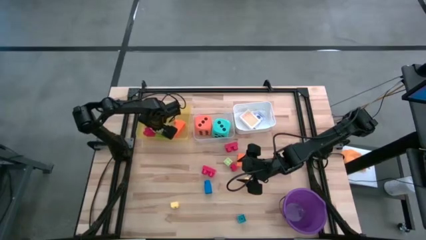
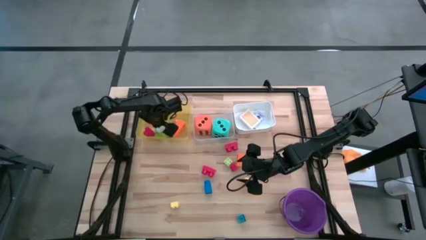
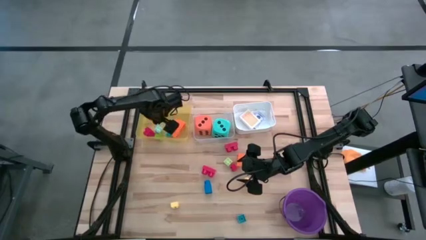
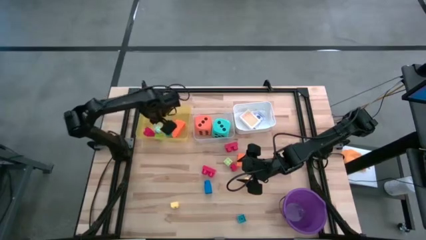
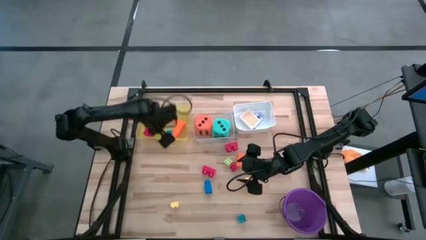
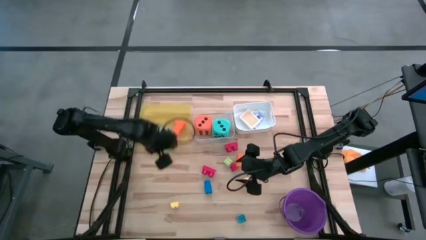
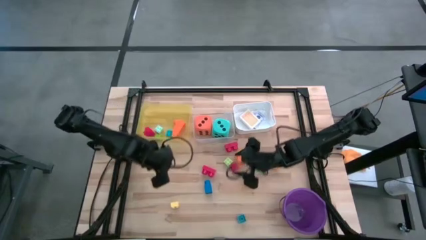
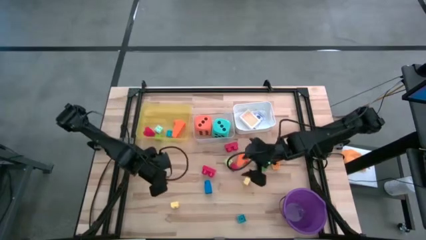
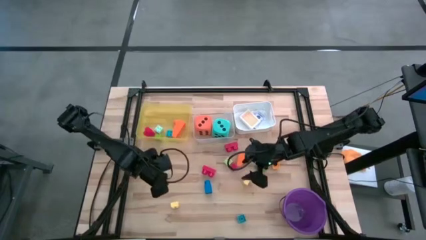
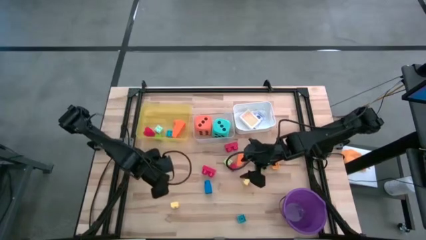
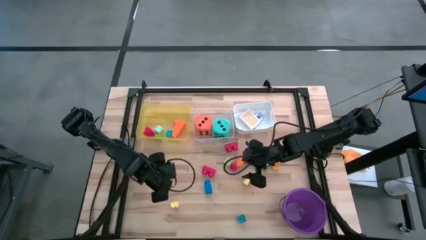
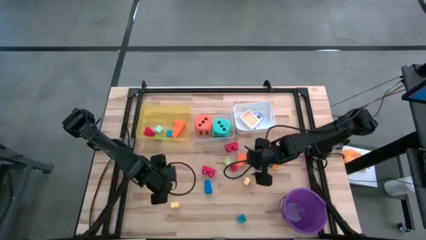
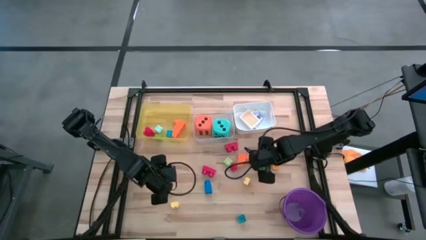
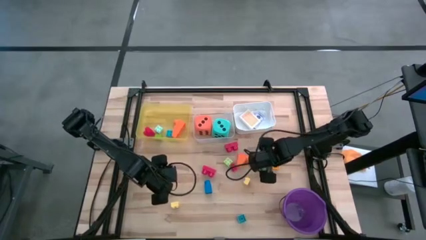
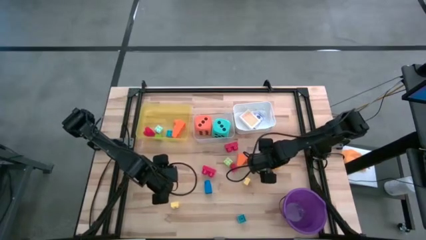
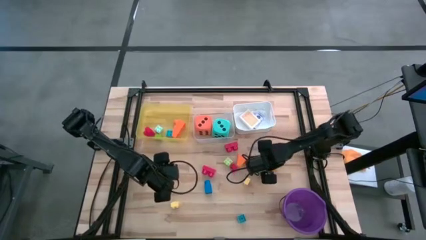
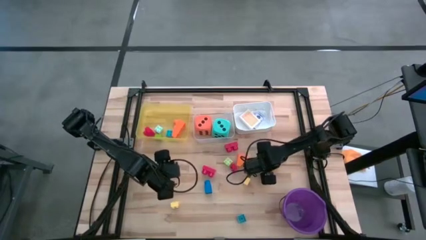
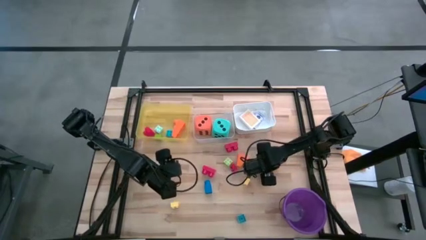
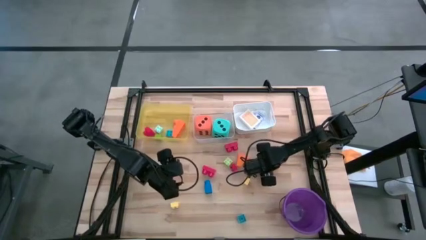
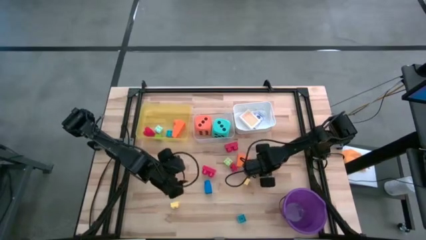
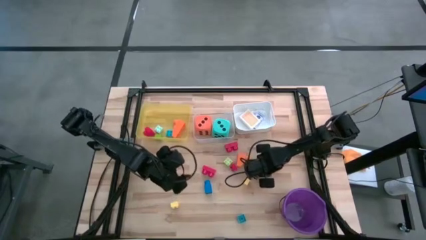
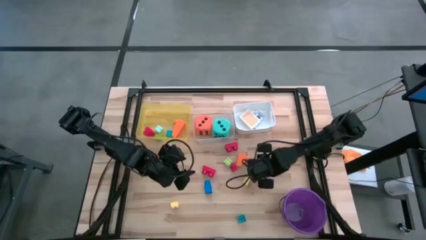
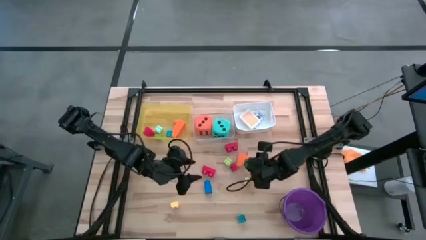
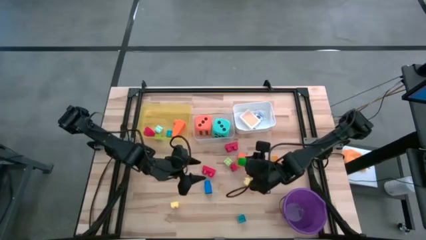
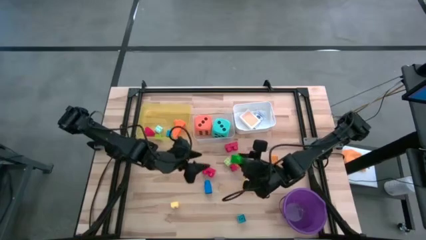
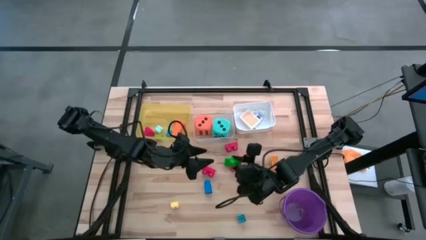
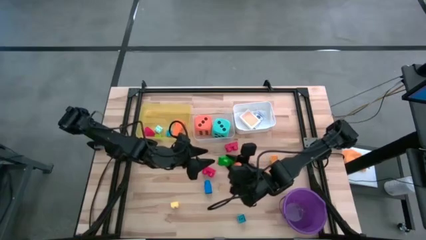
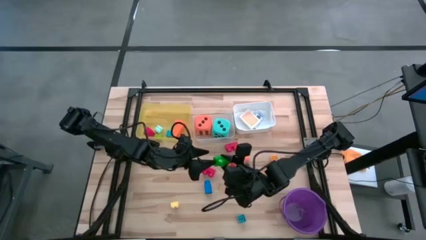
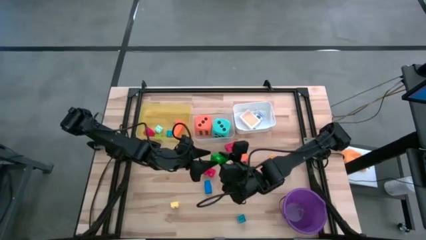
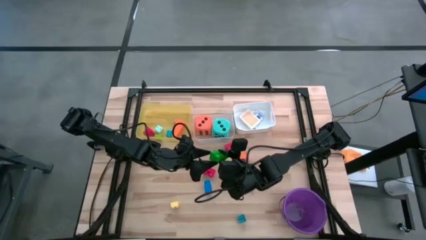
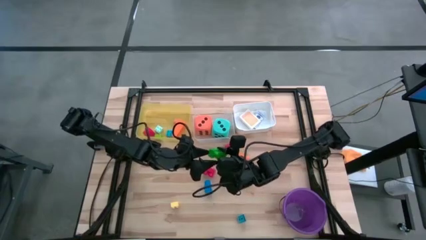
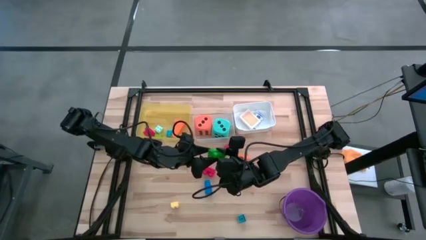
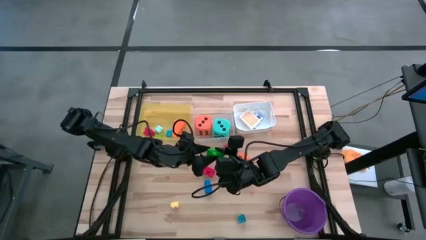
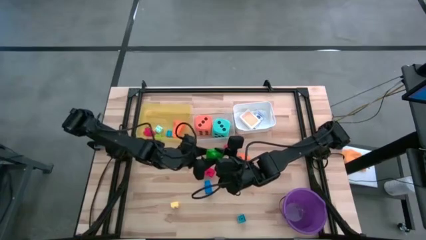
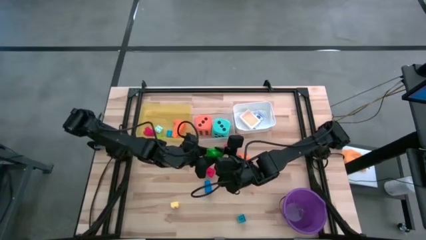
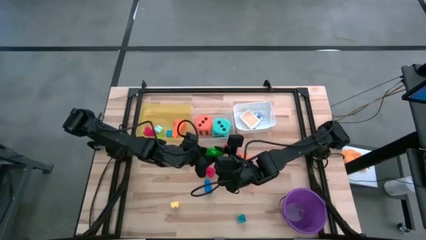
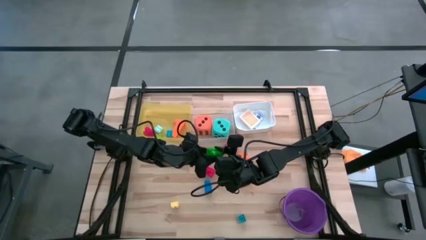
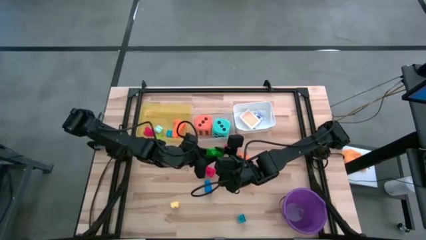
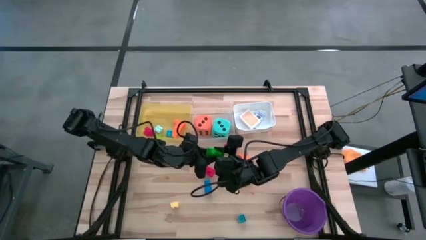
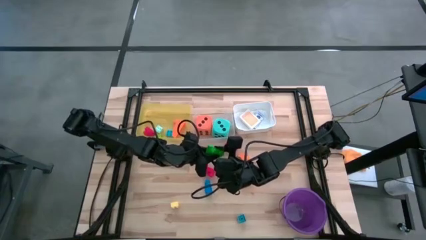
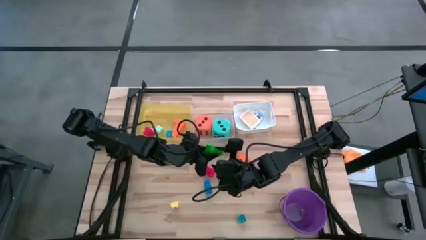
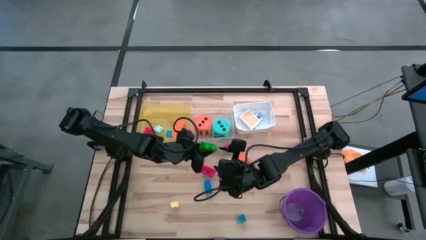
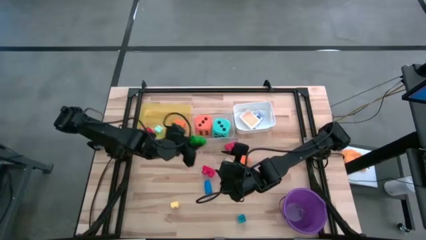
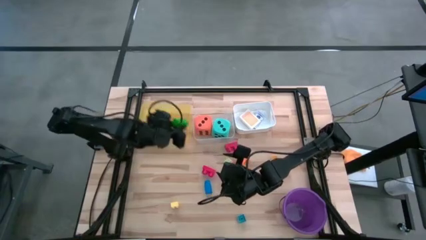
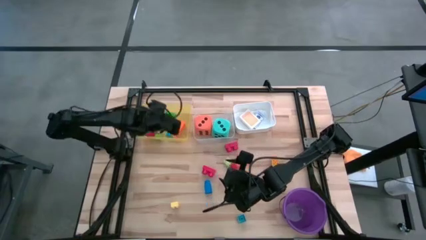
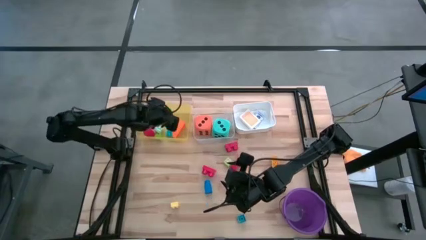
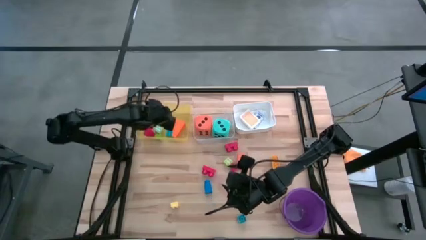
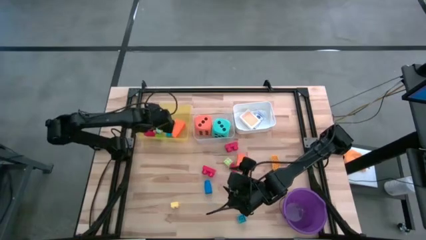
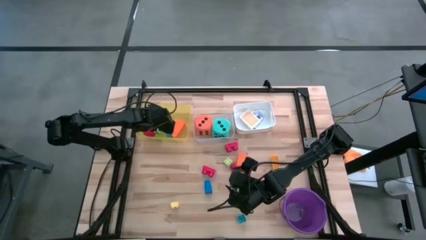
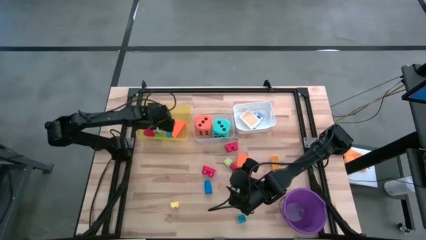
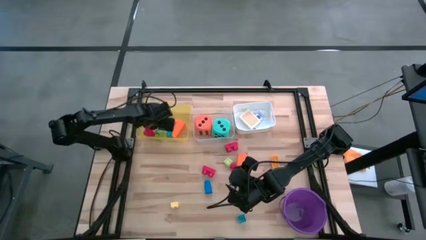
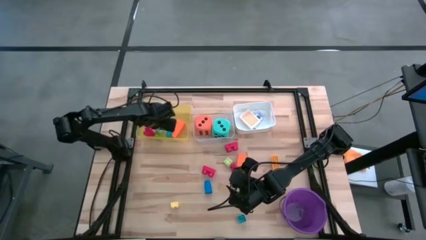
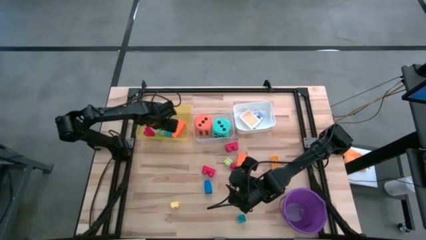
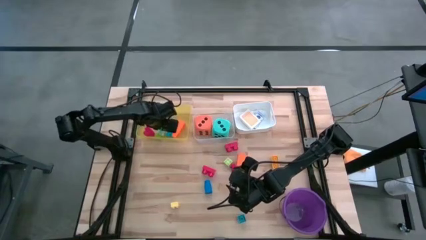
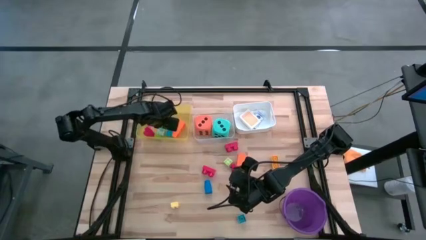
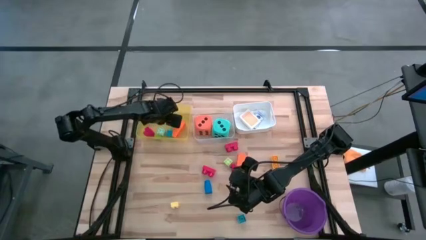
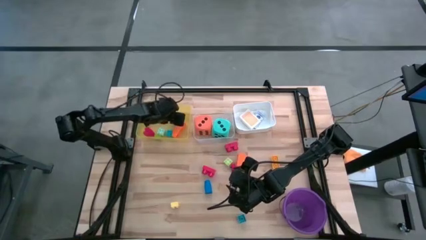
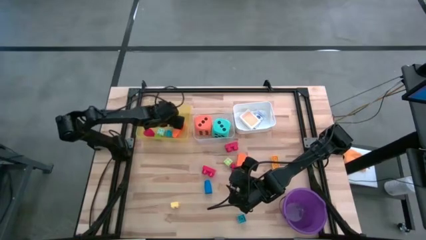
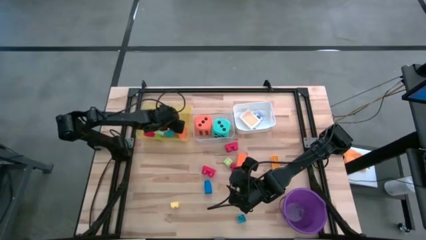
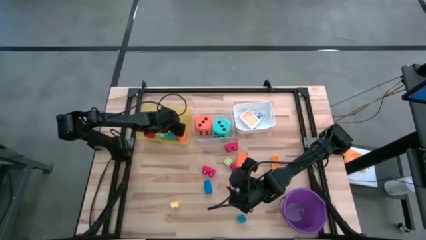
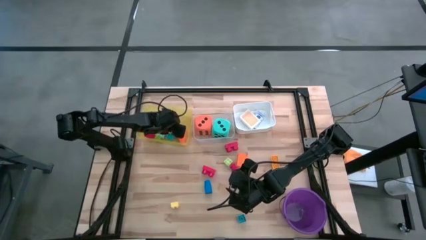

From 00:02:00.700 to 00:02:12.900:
Task: Pick & Place Toys
Put the green game piece into the yellow bin
